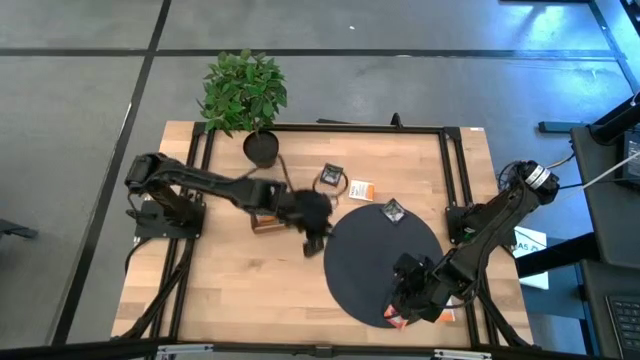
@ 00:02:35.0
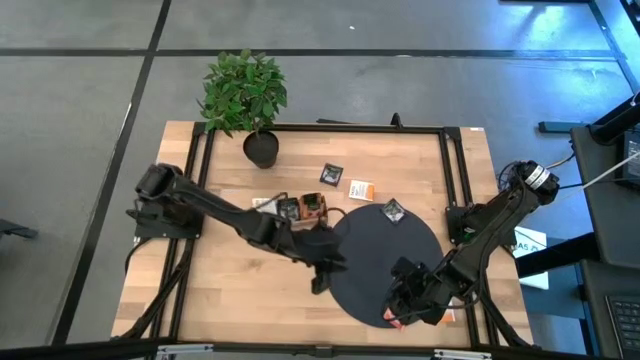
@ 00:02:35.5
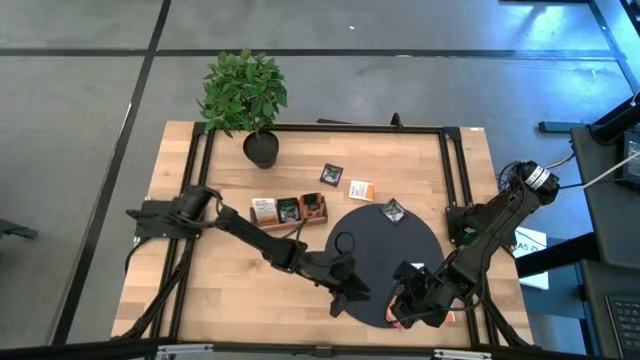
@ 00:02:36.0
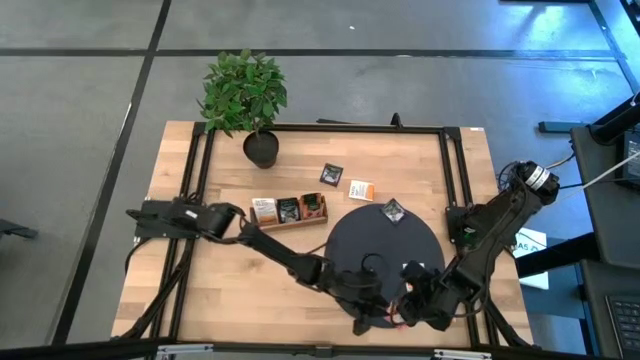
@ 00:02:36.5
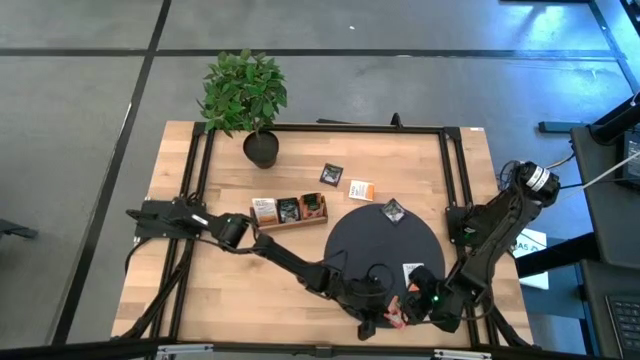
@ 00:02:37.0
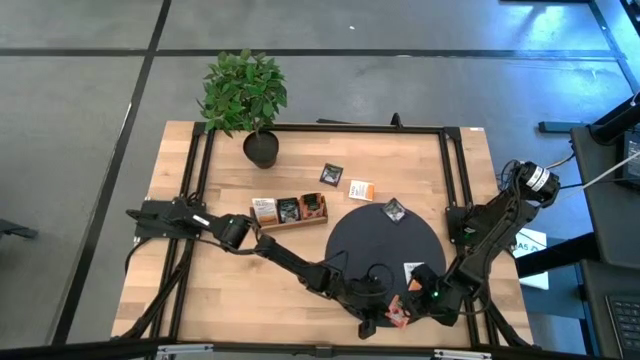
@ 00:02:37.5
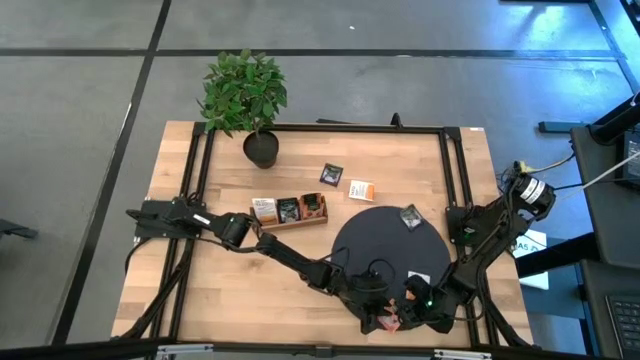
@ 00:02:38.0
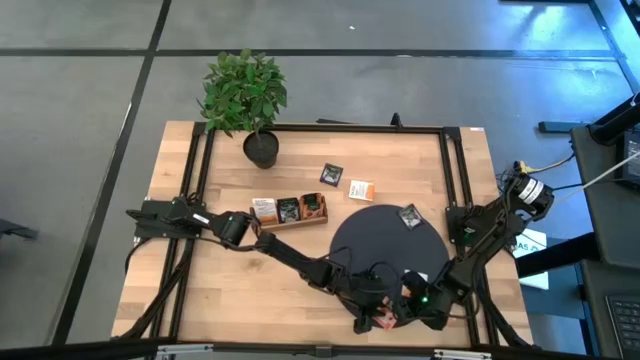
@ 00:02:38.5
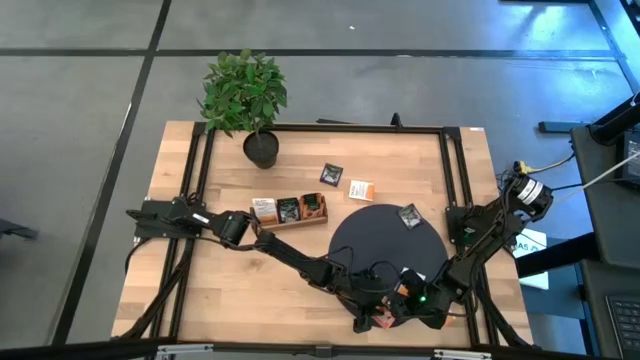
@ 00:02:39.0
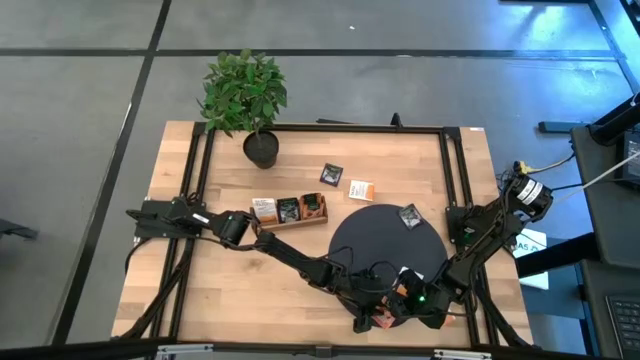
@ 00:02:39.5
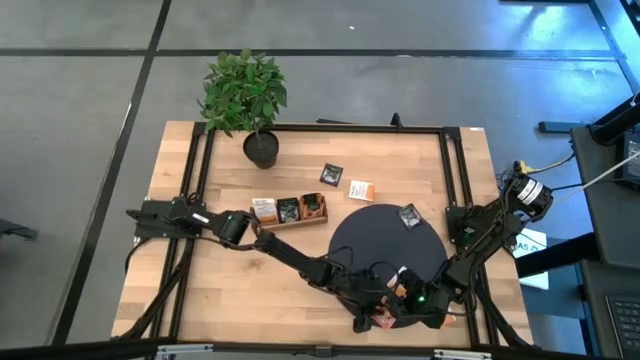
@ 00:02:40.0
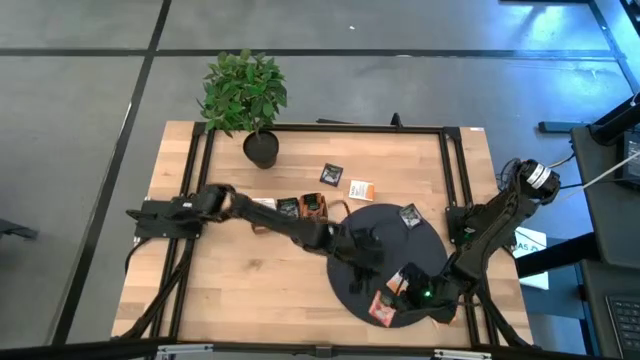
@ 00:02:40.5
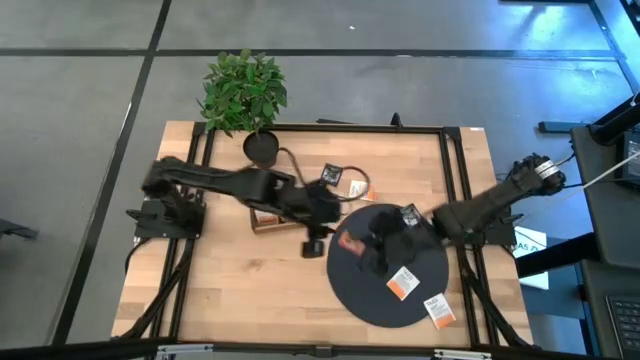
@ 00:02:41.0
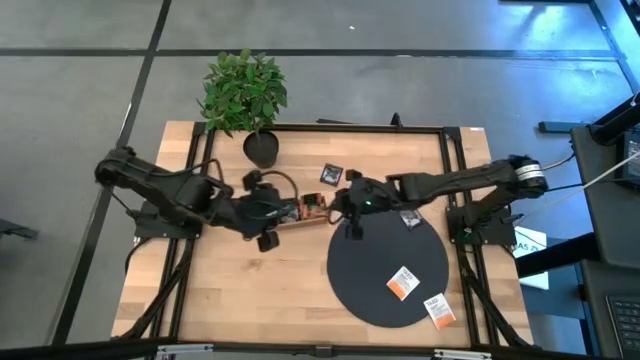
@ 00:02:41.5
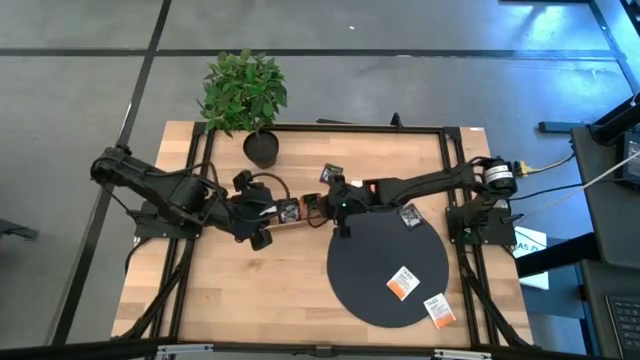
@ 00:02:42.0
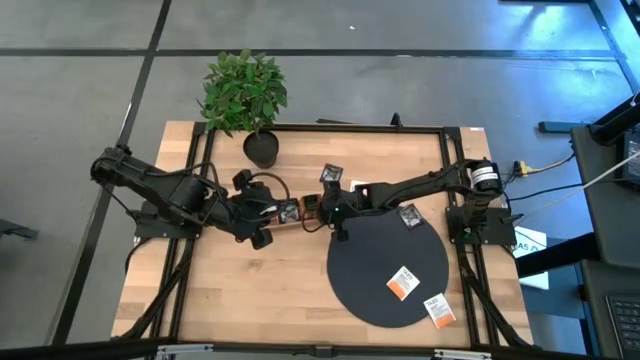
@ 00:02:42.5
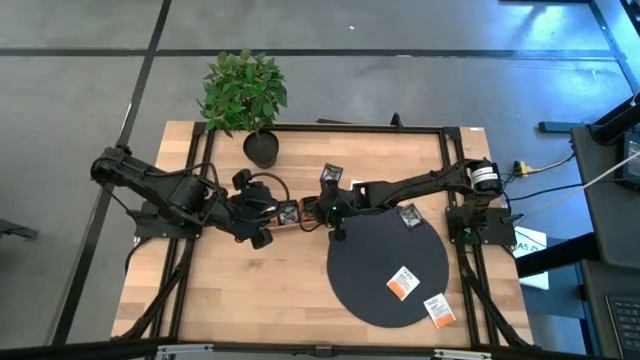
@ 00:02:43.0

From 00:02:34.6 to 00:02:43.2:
Task: Pick & Place Tea
Put the orange tea bag into the right section of the wooden organizer

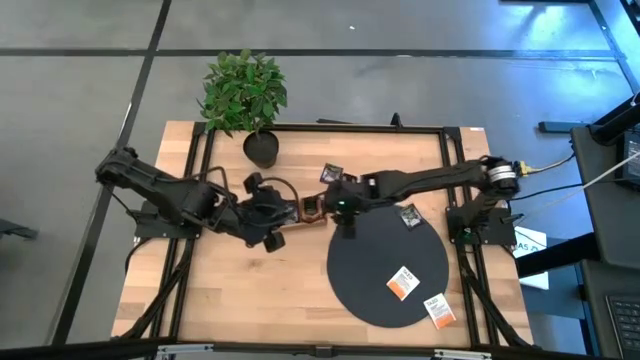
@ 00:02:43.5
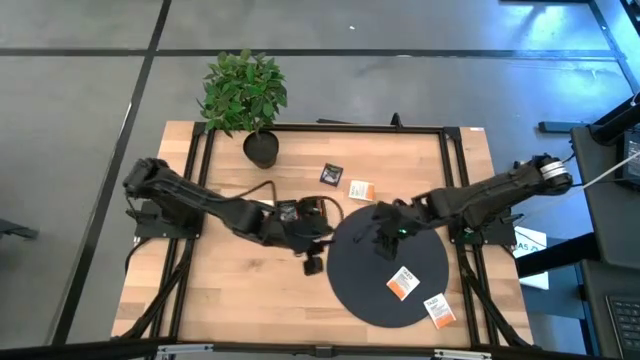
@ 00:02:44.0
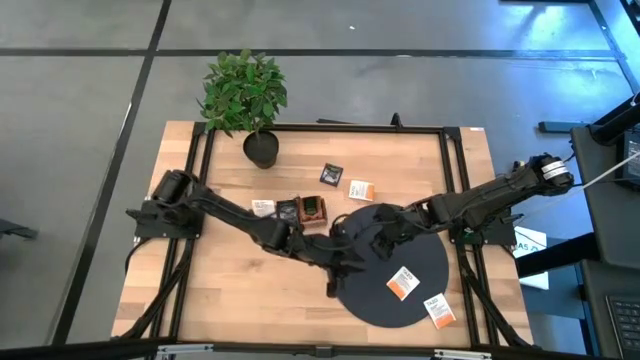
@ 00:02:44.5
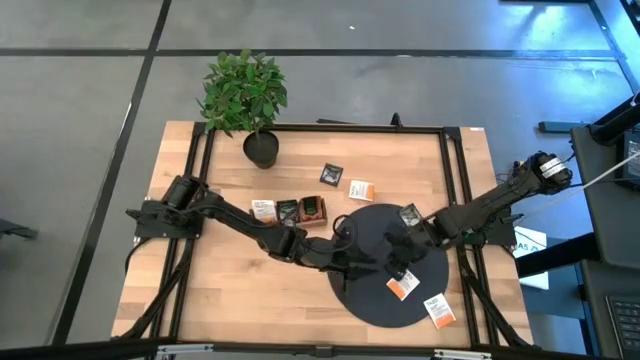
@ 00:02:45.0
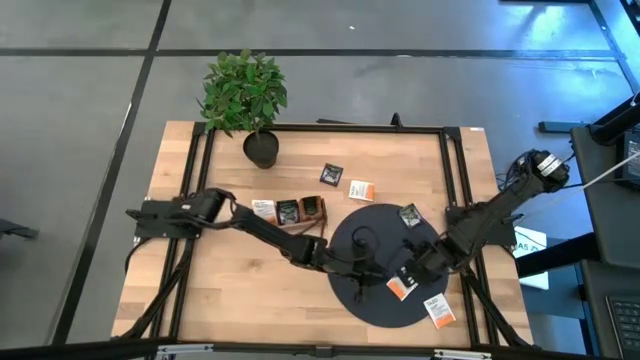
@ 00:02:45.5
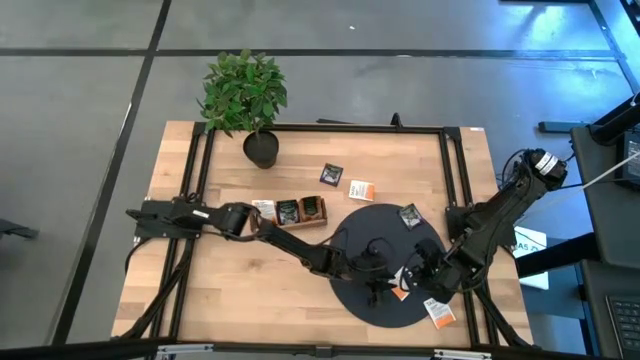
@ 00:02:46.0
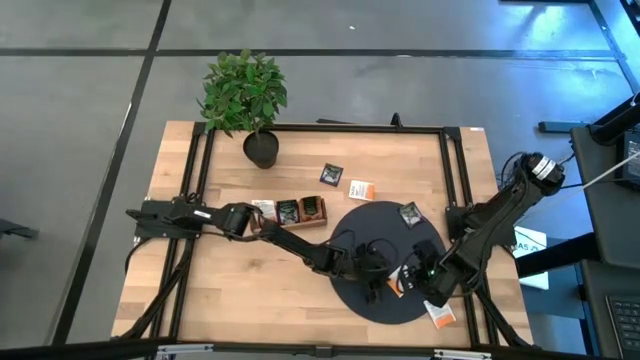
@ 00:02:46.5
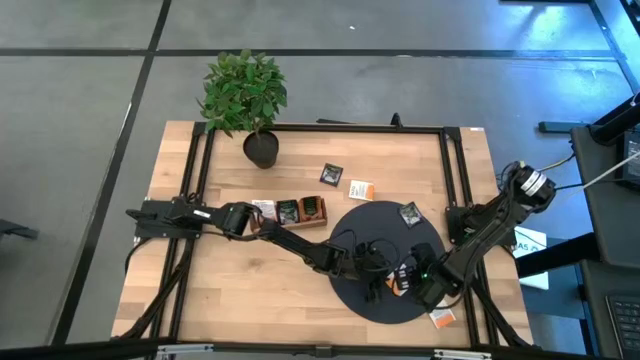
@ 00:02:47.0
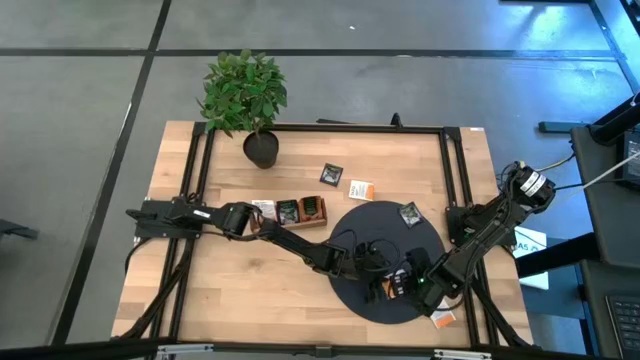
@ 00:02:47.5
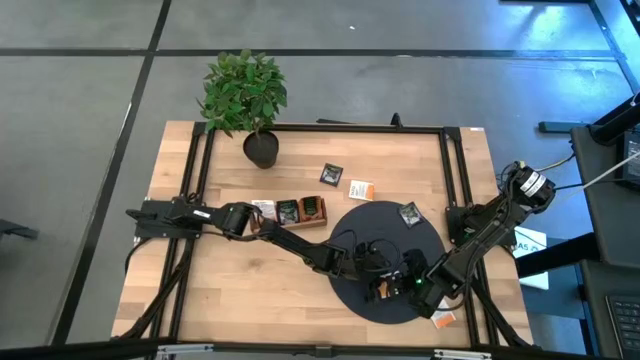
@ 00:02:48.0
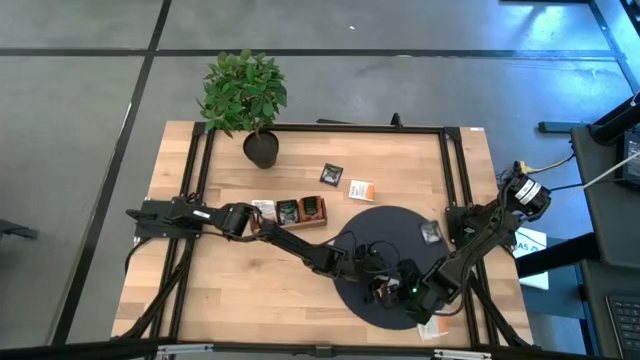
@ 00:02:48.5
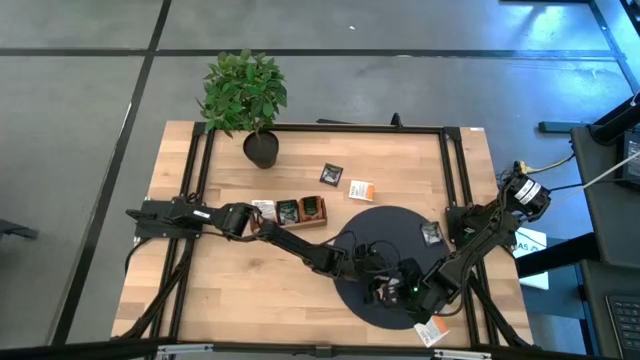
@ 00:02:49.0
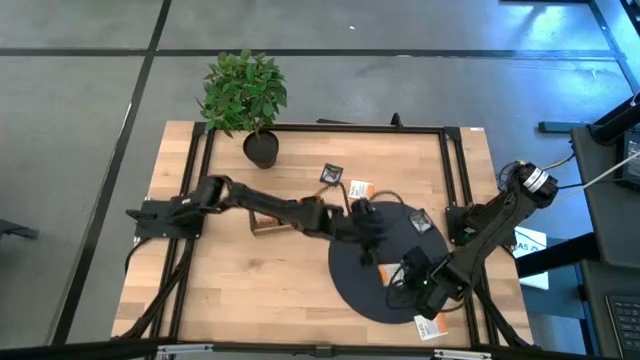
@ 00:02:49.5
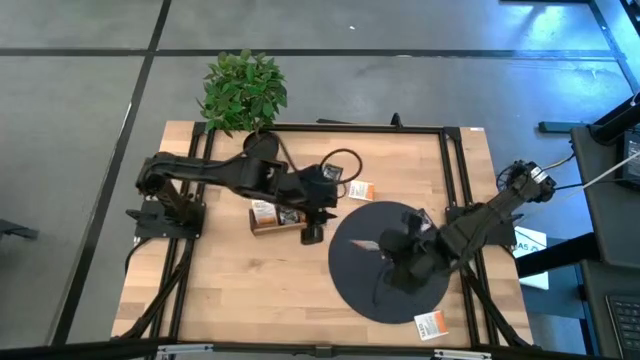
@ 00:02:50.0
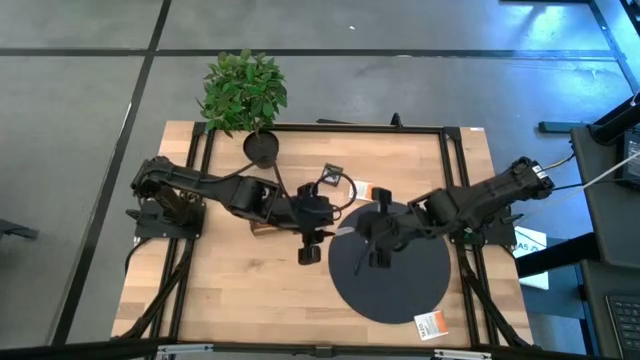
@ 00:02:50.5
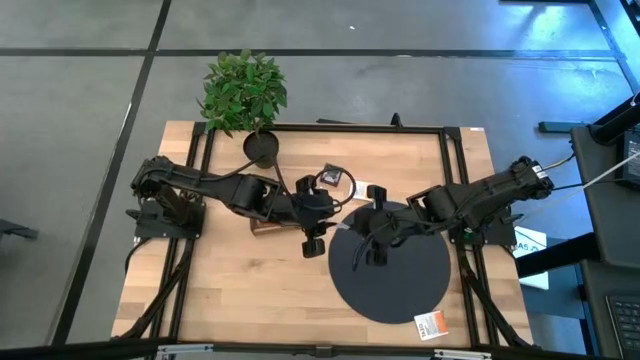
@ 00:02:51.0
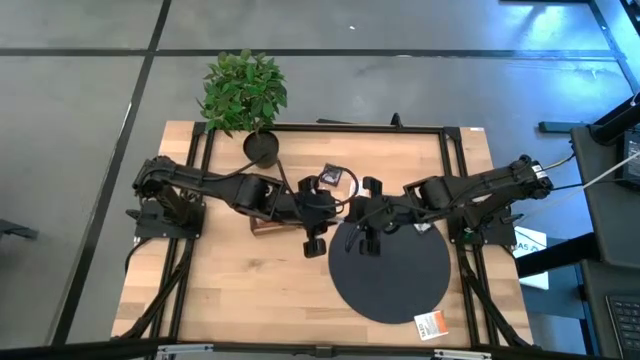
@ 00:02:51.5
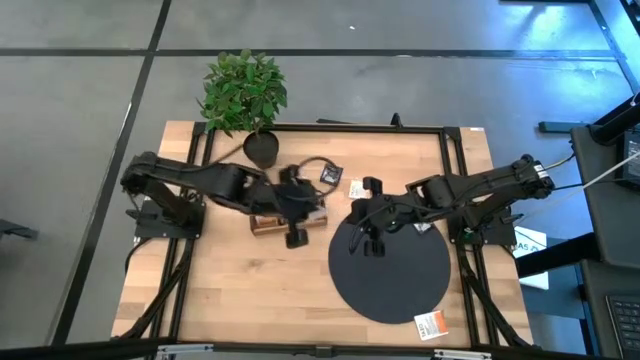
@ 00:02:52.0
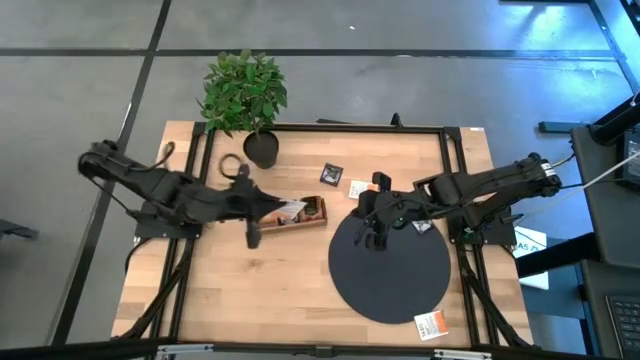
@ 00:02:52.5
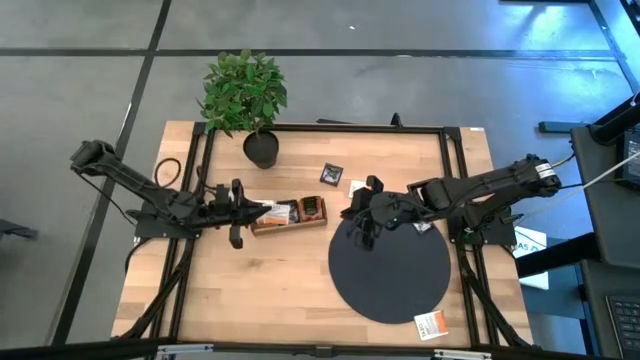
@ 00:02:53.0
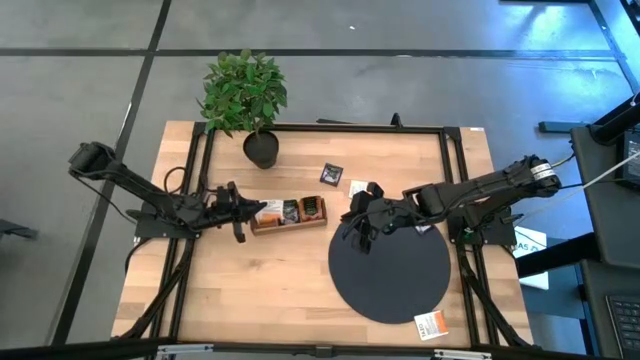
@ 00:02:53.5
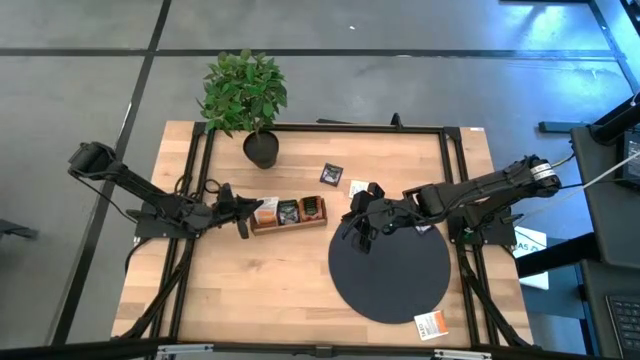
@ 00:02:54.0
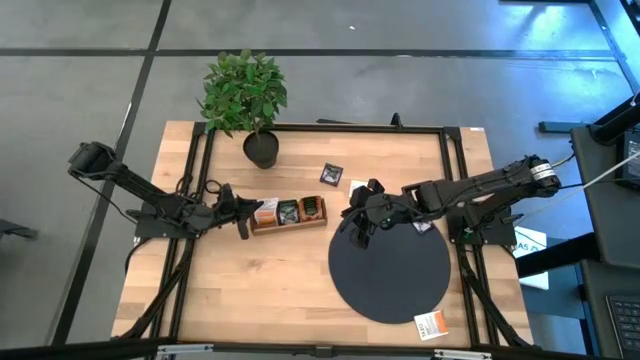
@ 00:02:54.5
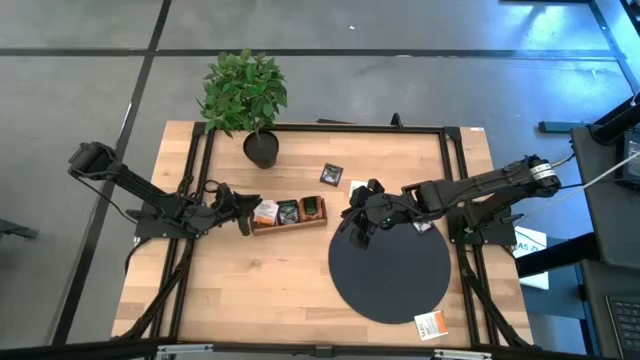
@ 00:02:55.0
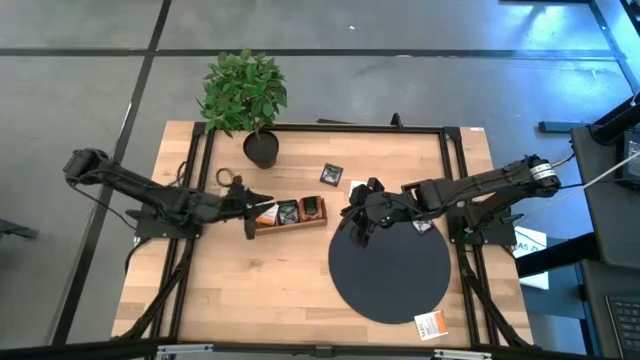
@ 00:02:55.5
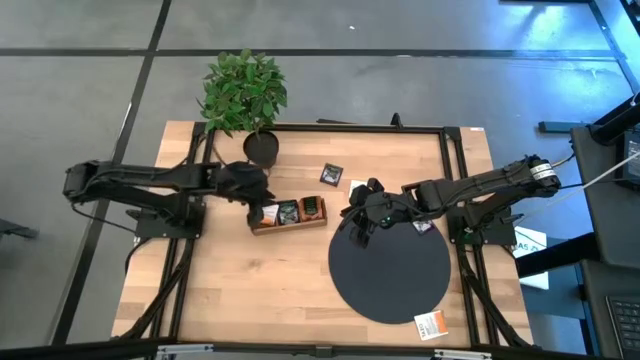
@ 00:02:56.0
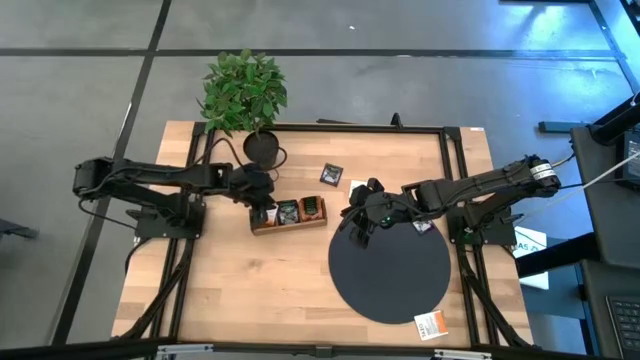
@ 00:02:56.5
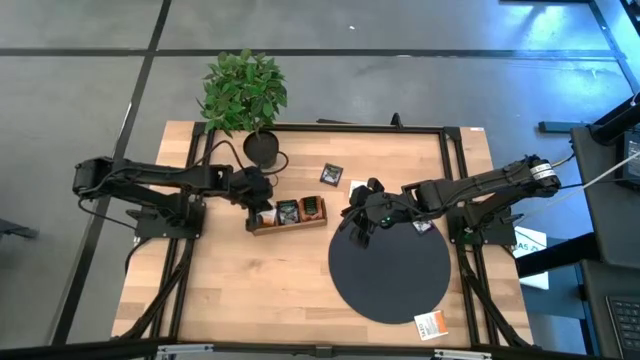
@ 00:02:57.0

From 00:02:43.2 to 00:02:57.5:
Put the middle white tea bag into the left section of the wooden organizer
